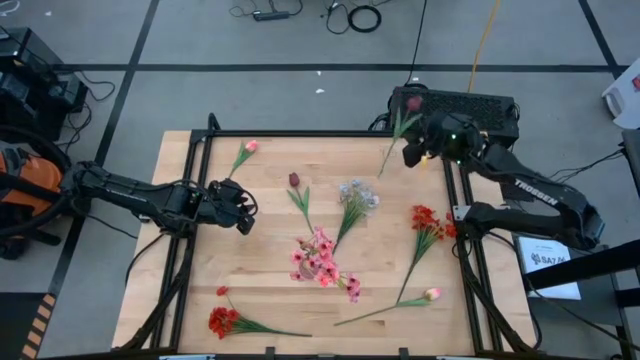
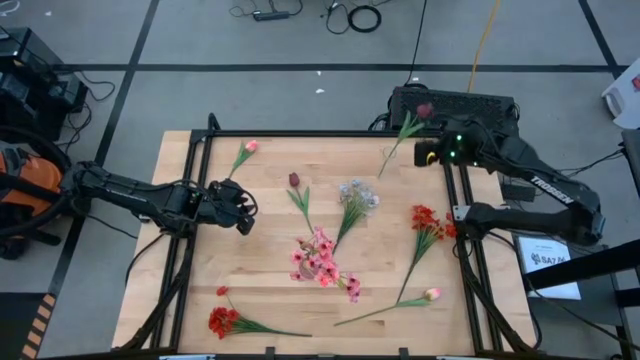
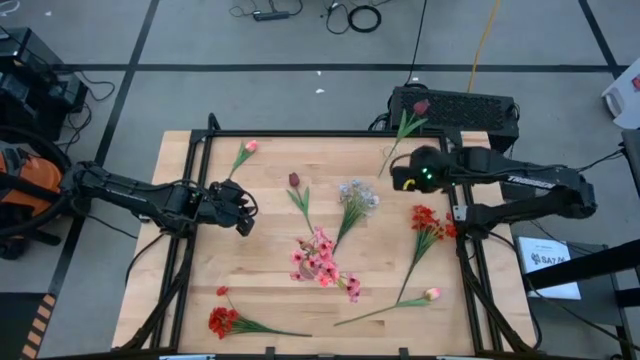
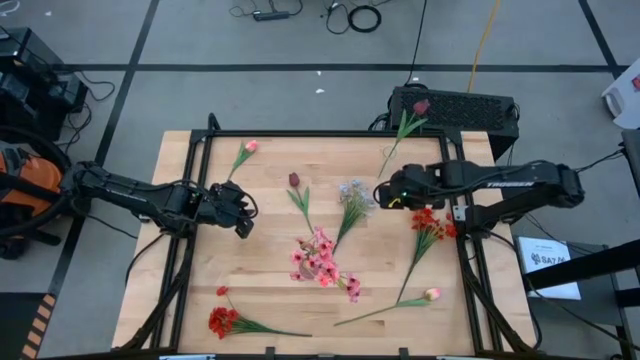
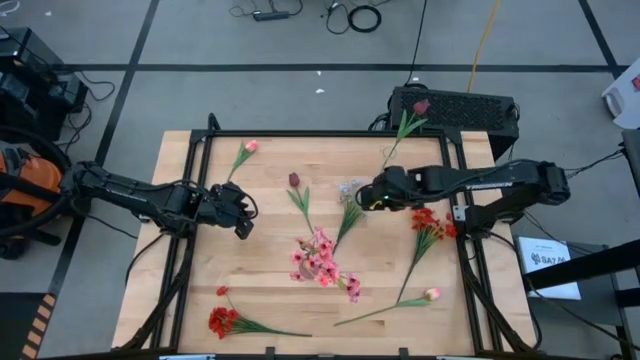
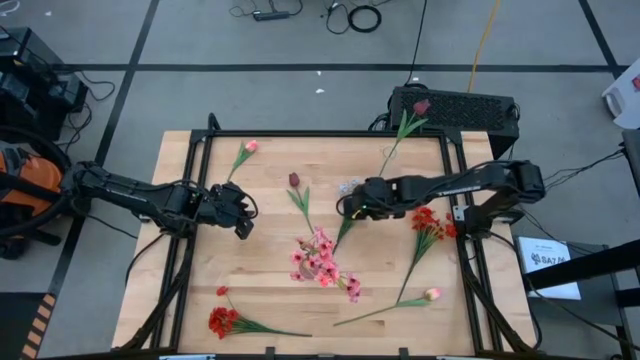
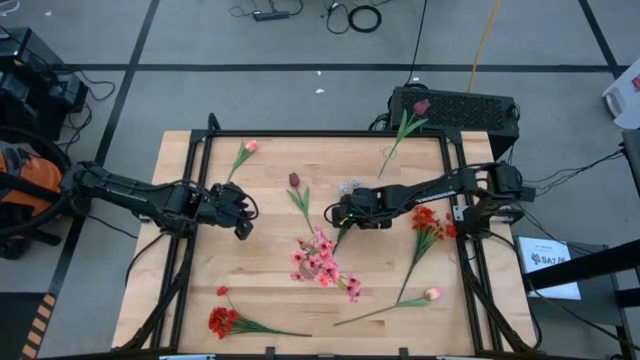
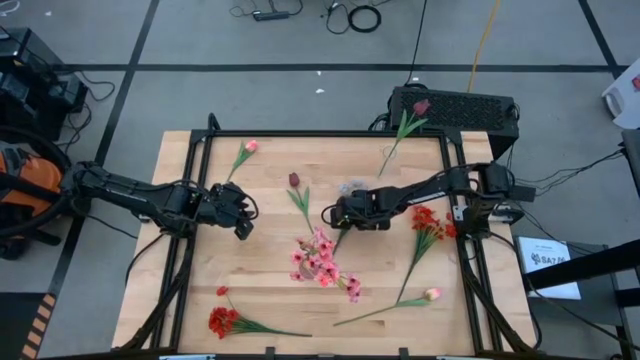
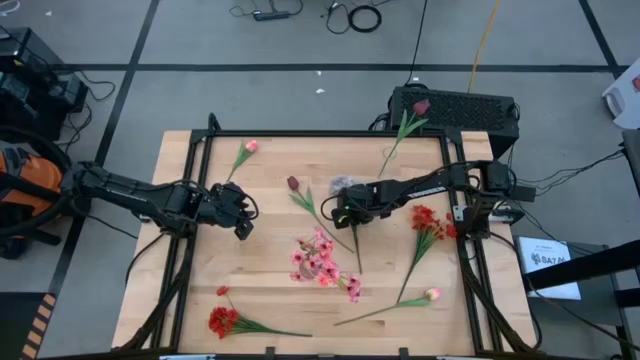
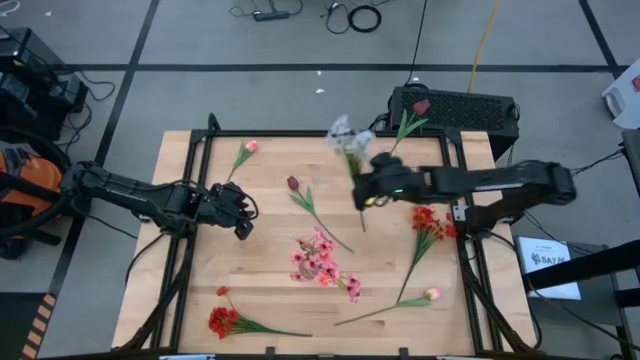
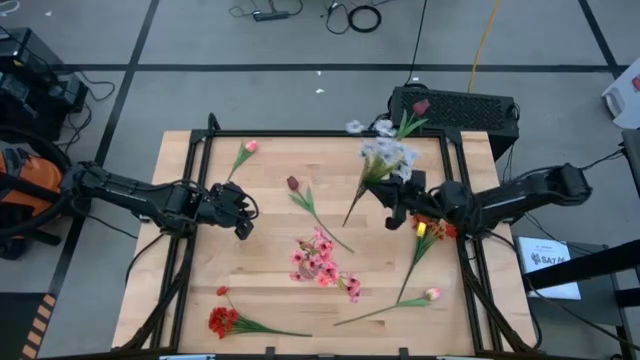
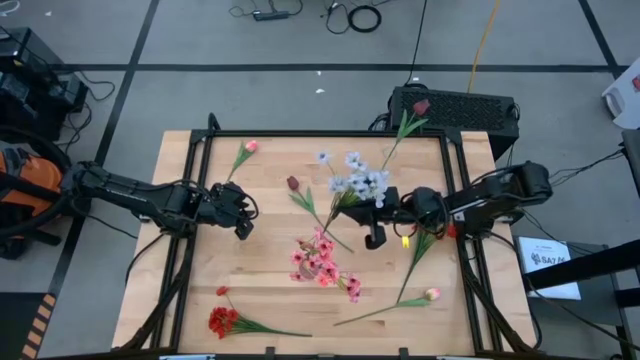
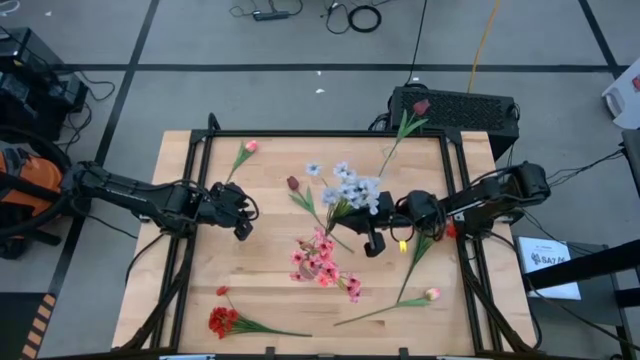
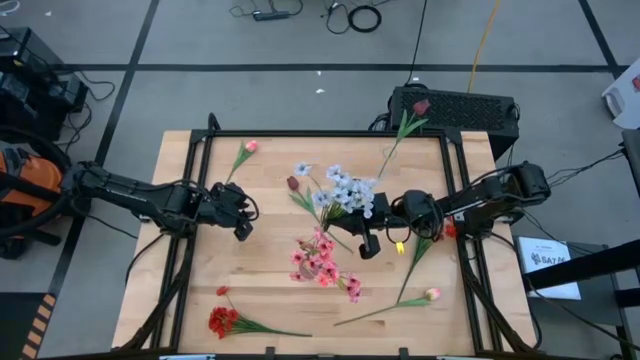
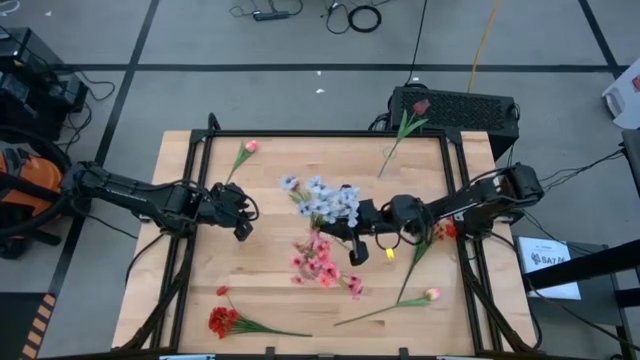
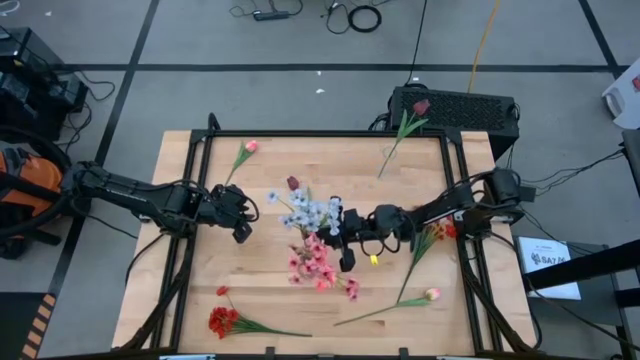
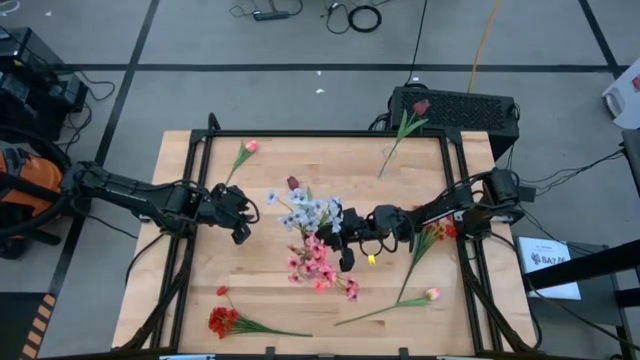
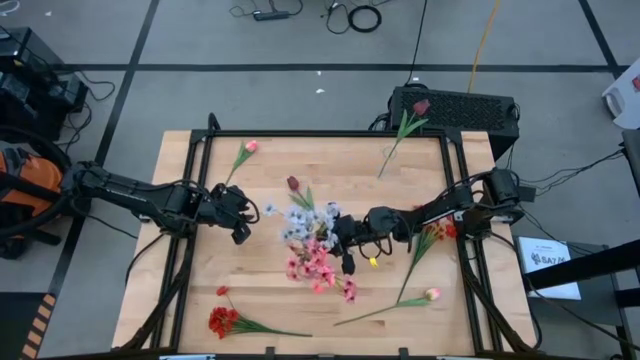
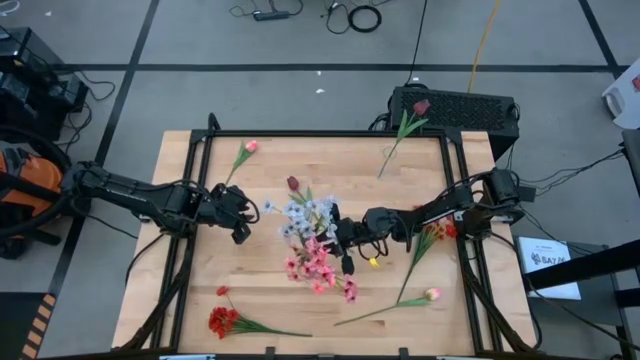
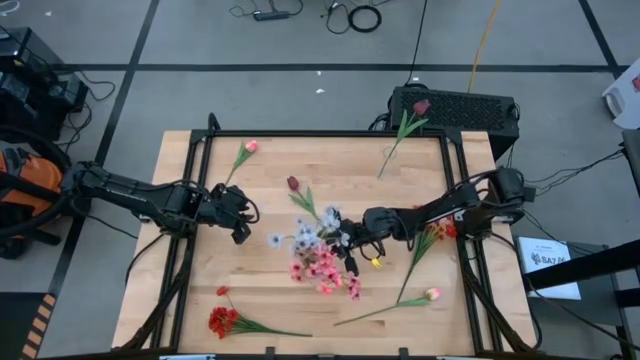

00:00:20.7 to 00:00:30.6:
Task: Sort flowers into vase by color
Put the white flowers into the purple vase

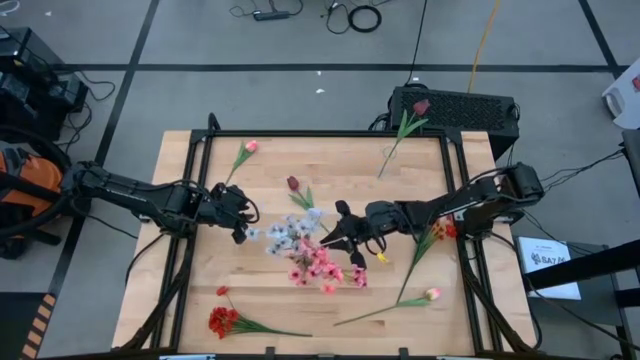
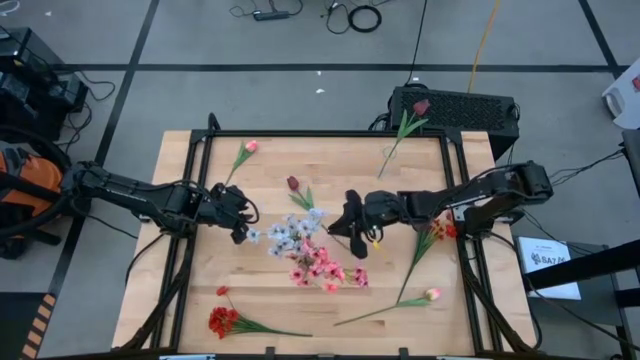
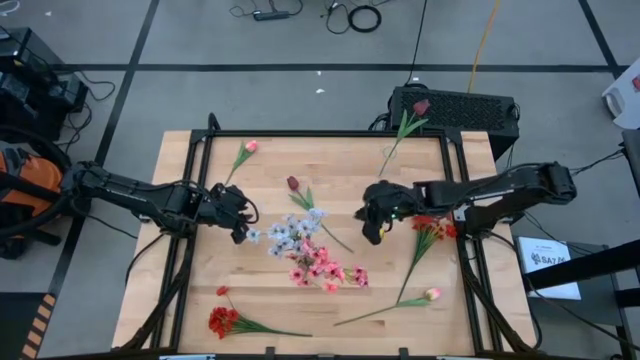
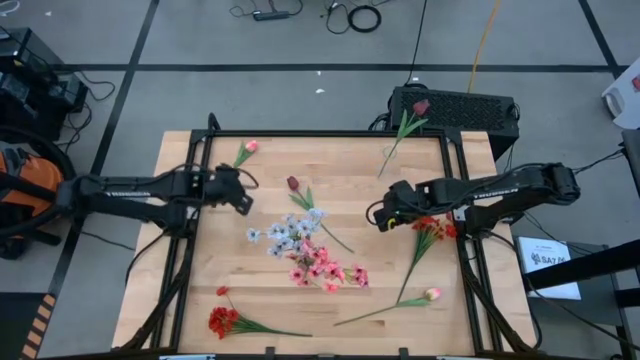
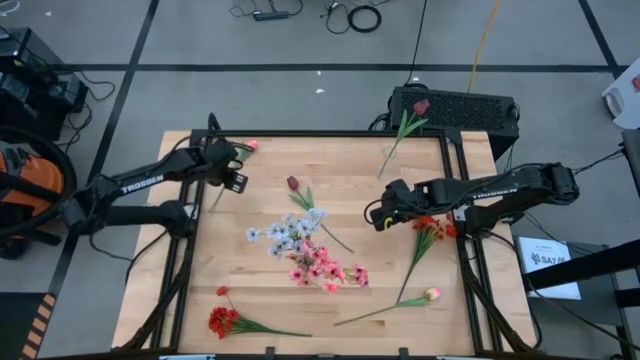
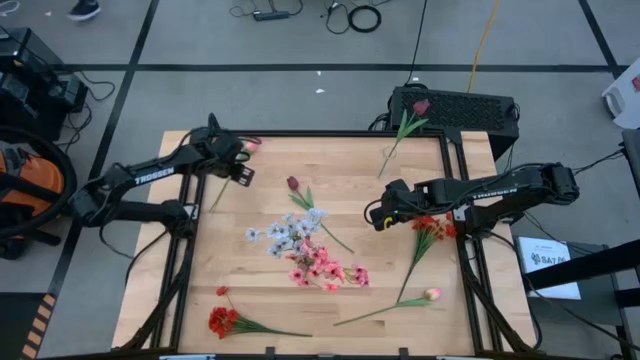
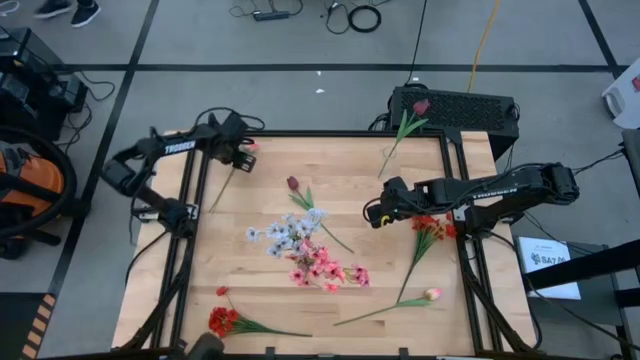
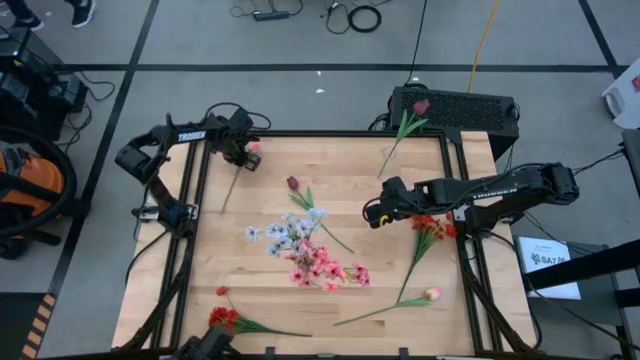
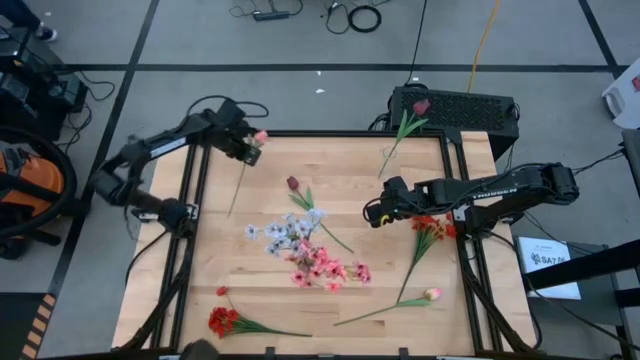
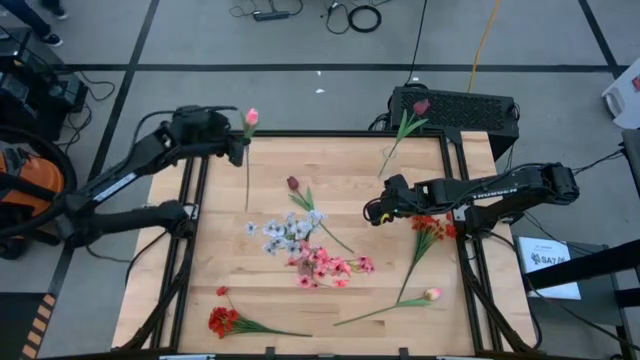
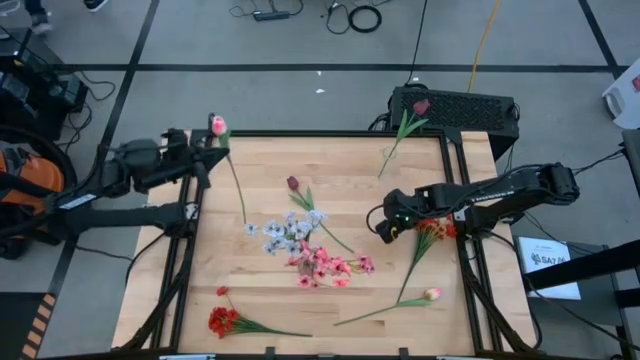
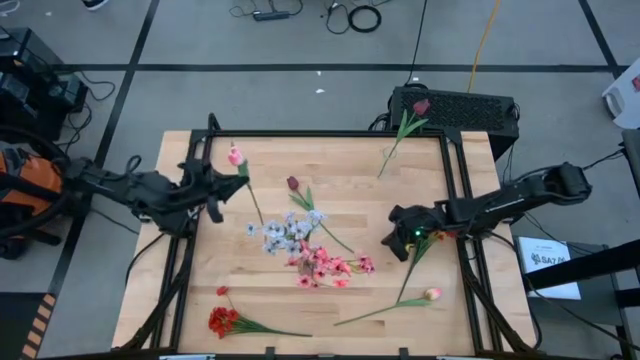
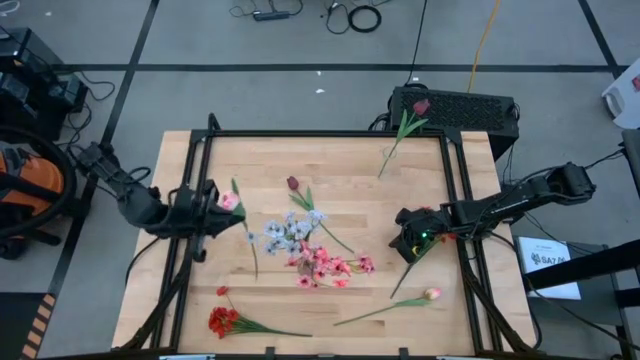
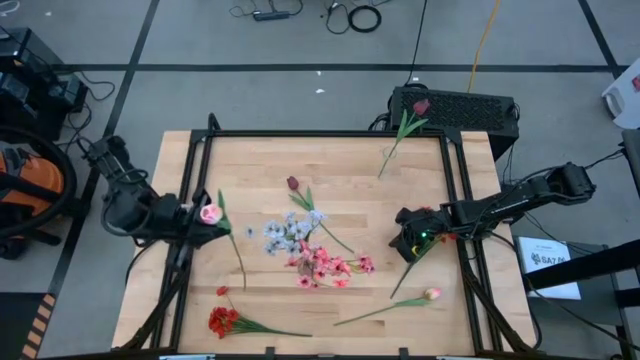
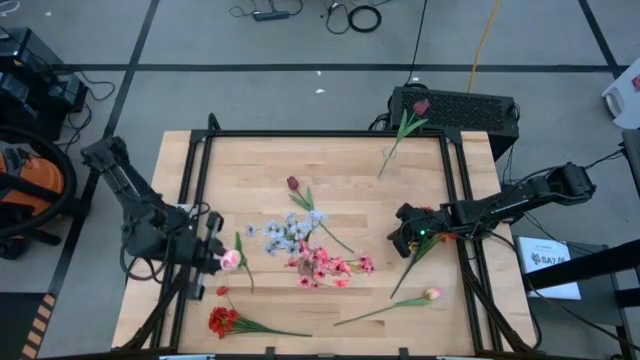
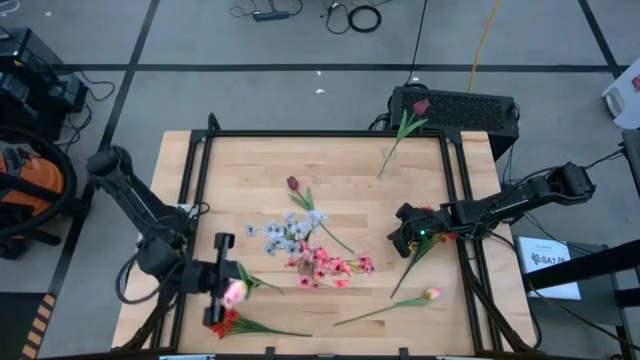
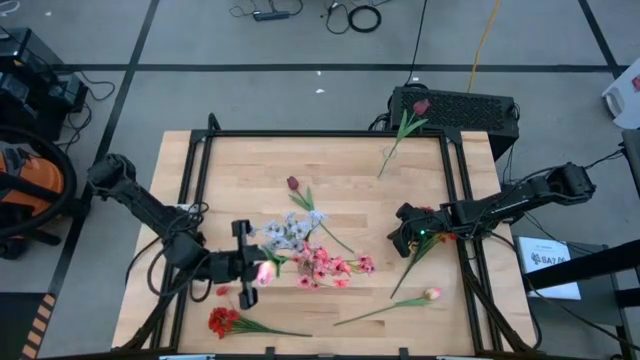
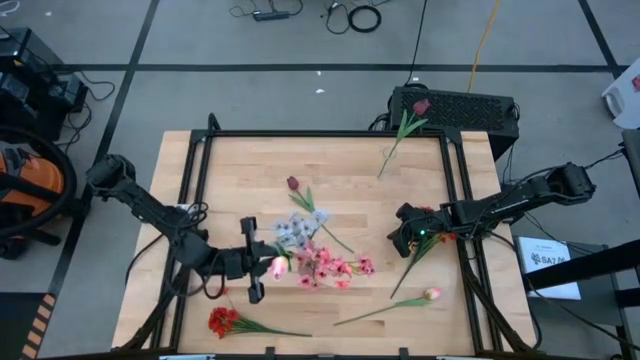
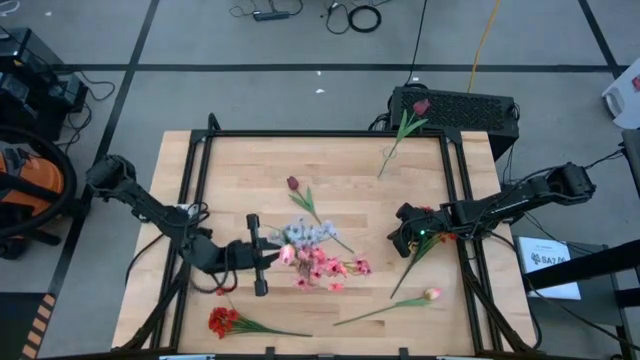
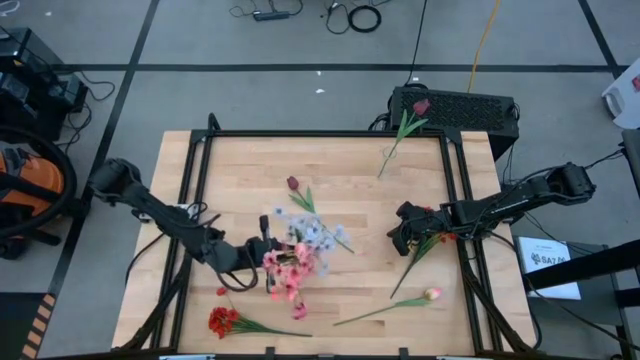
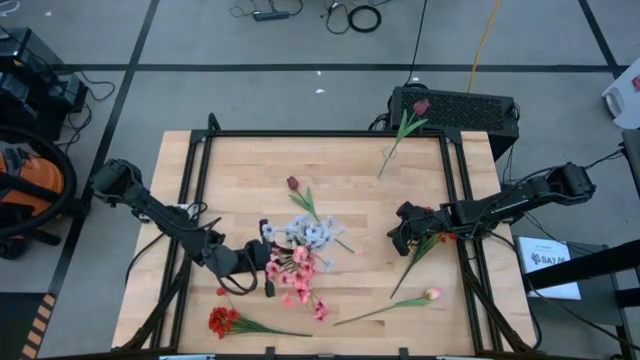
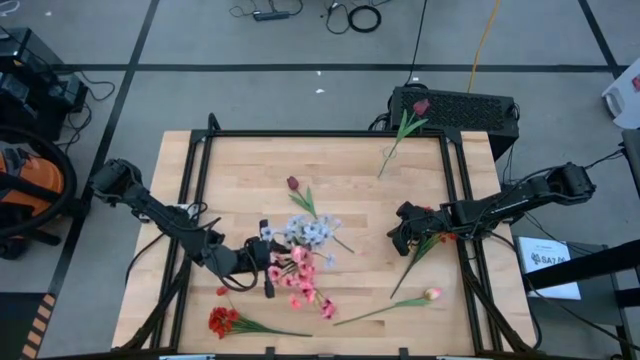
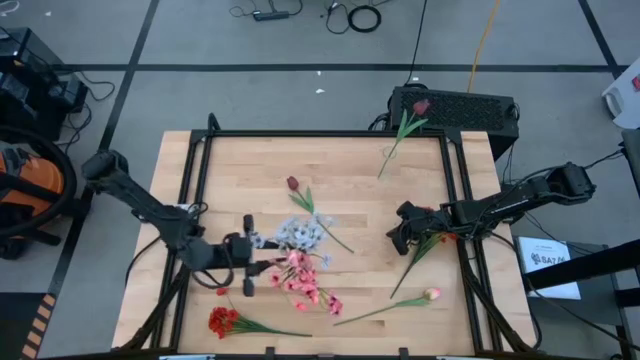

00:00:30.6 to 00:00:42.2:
Put the top pink flower into the purple vase
